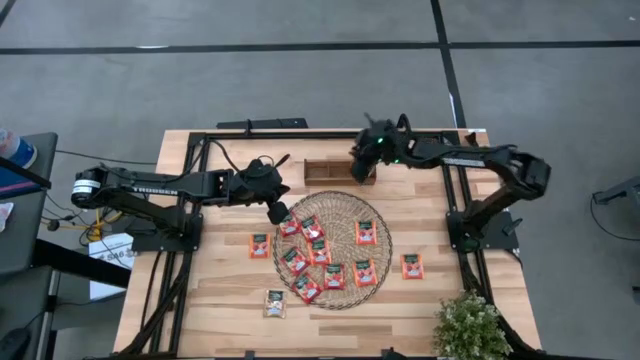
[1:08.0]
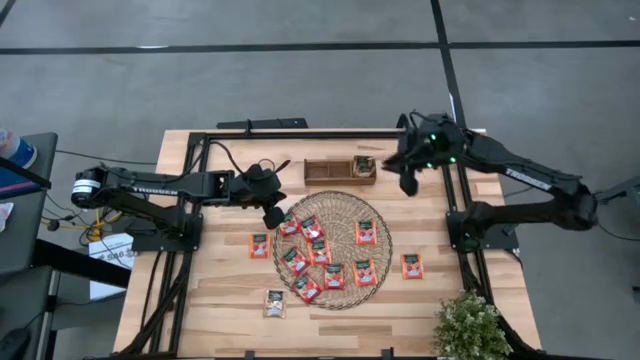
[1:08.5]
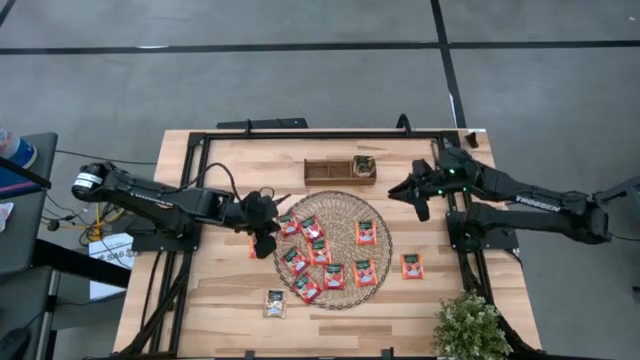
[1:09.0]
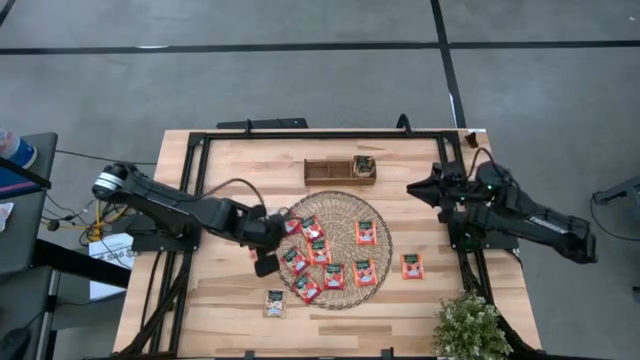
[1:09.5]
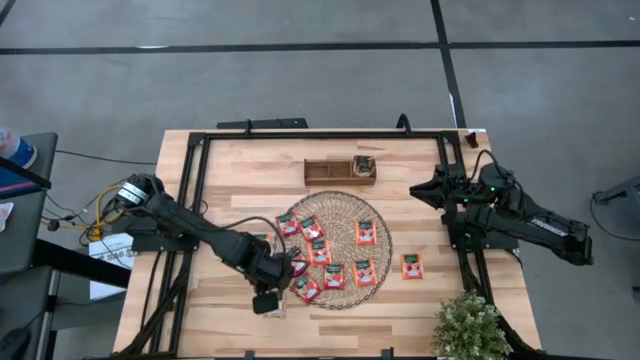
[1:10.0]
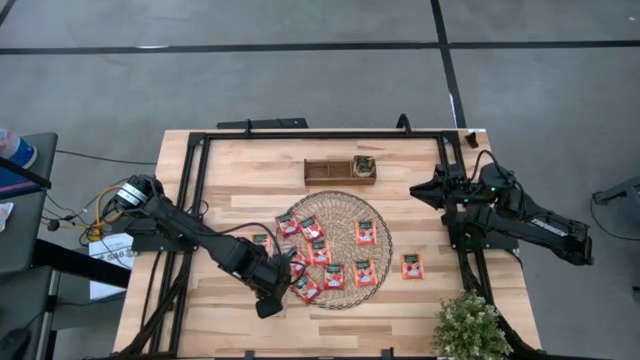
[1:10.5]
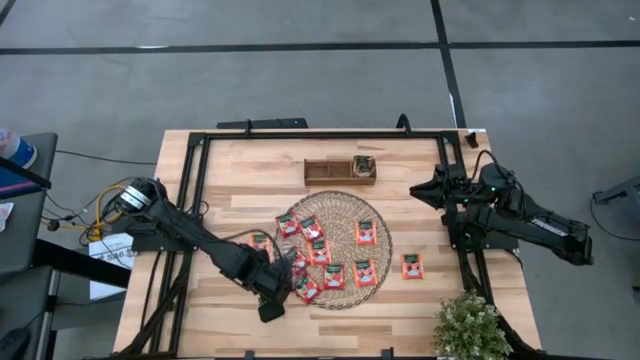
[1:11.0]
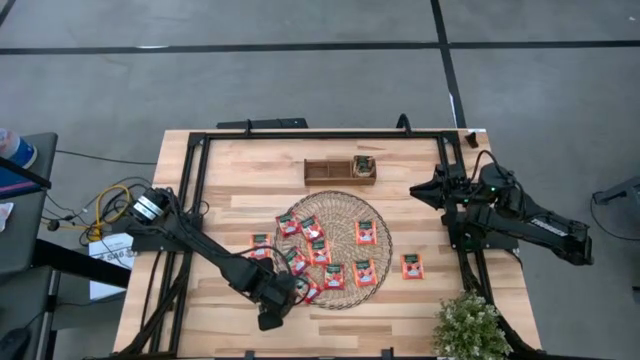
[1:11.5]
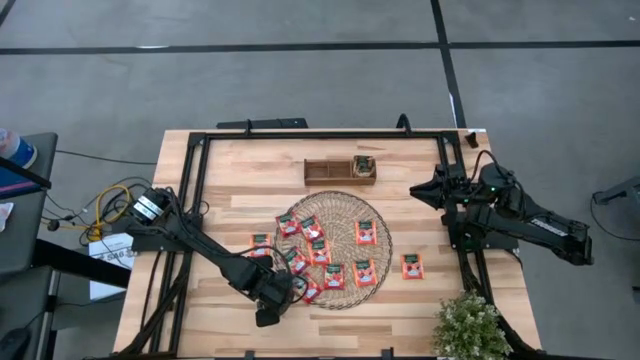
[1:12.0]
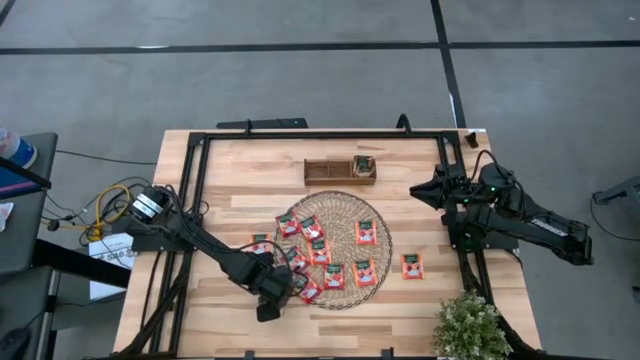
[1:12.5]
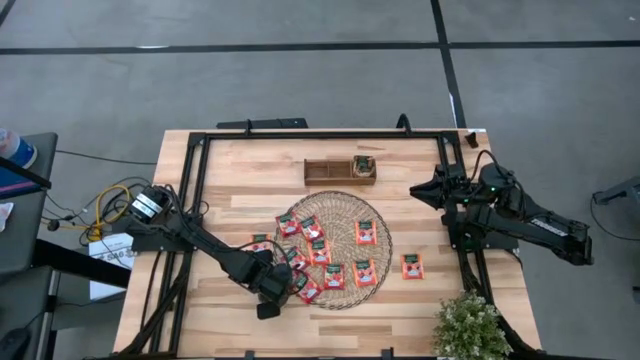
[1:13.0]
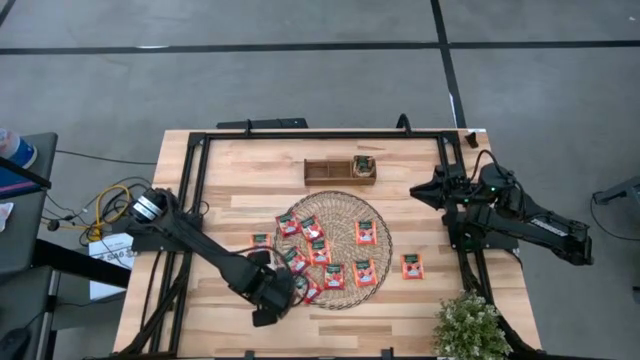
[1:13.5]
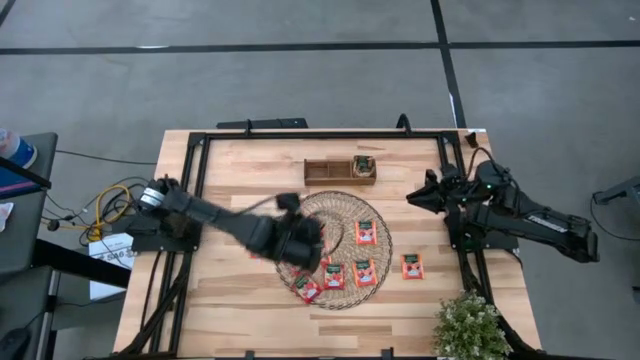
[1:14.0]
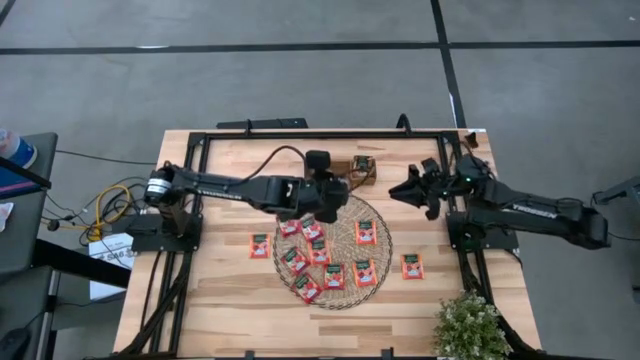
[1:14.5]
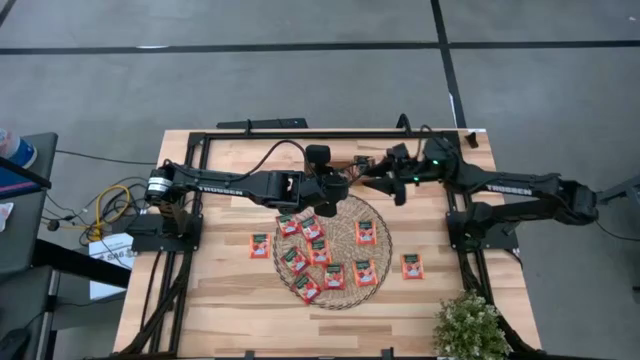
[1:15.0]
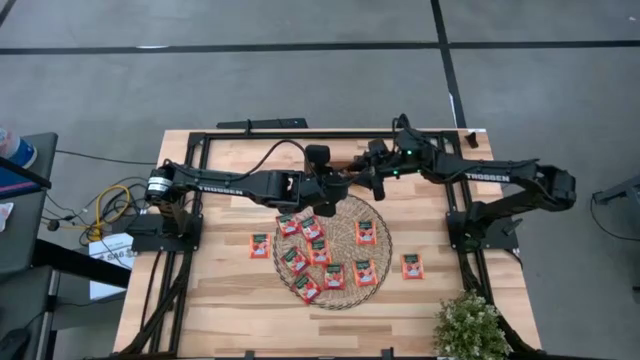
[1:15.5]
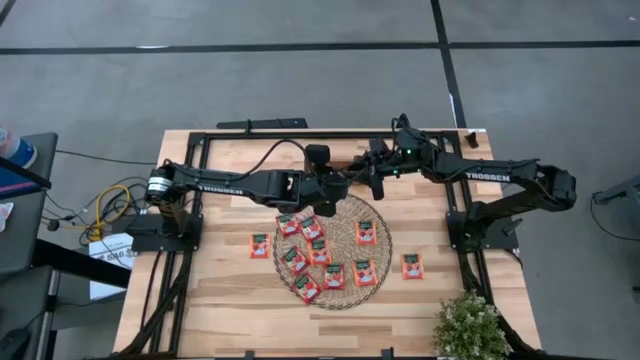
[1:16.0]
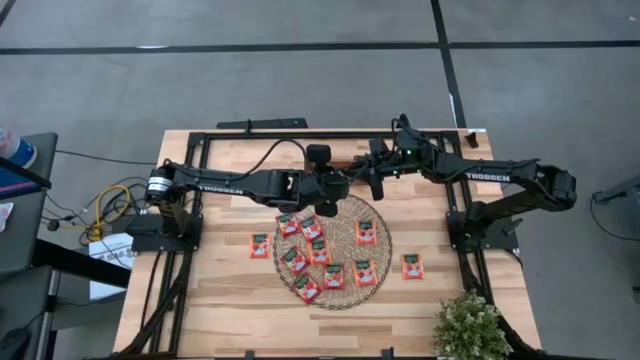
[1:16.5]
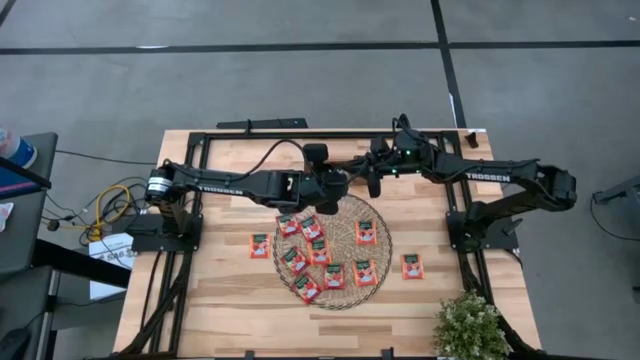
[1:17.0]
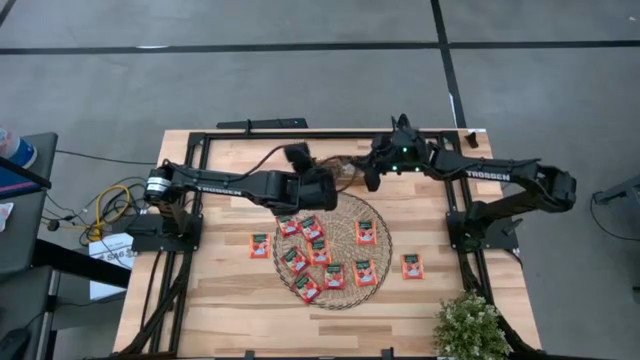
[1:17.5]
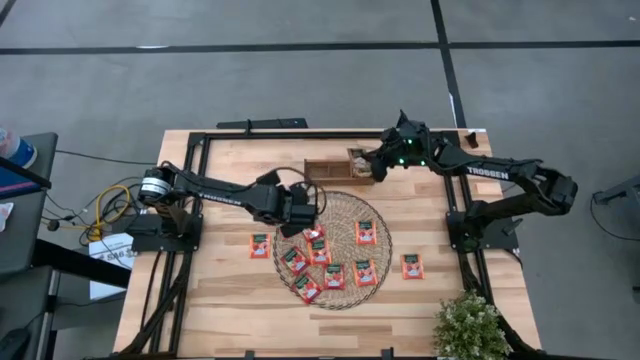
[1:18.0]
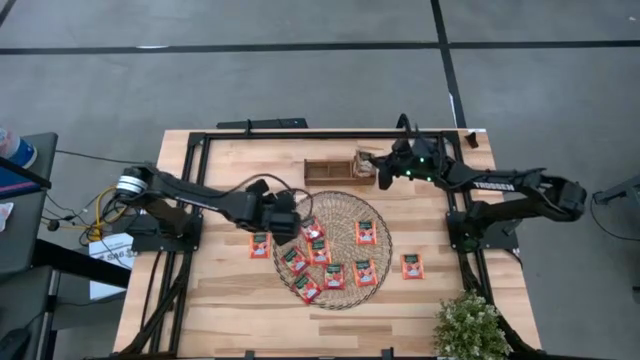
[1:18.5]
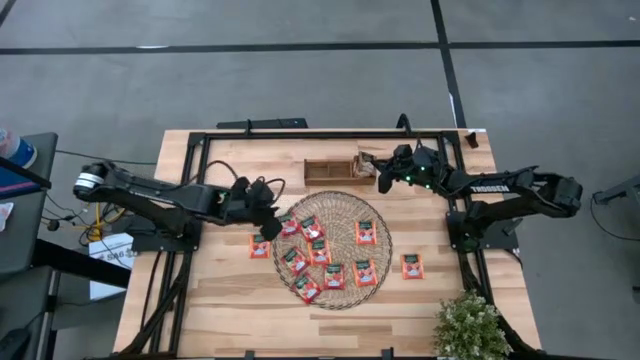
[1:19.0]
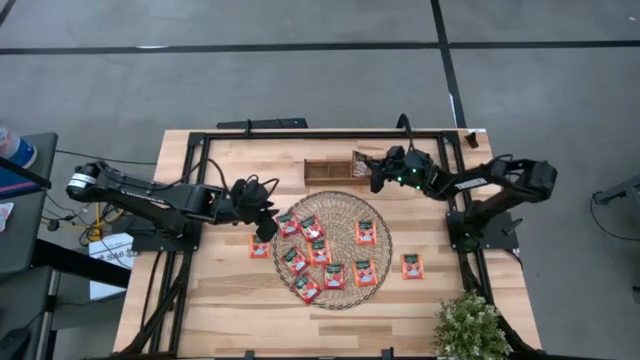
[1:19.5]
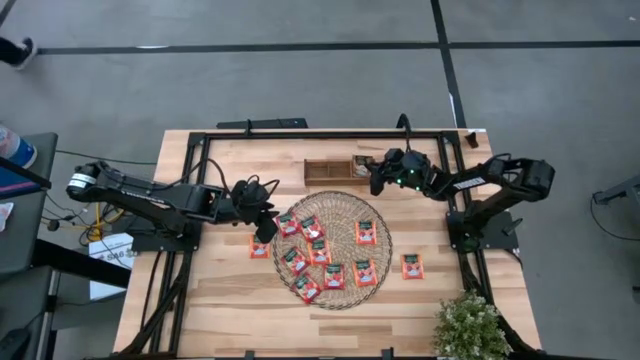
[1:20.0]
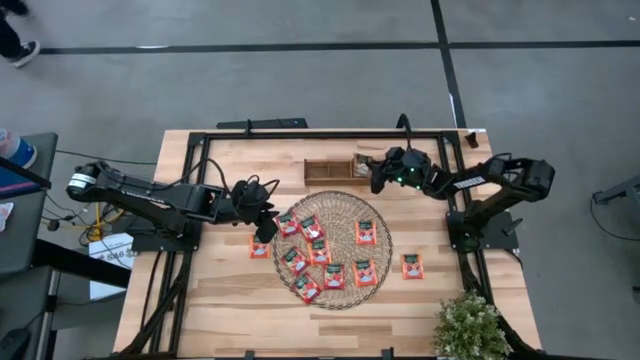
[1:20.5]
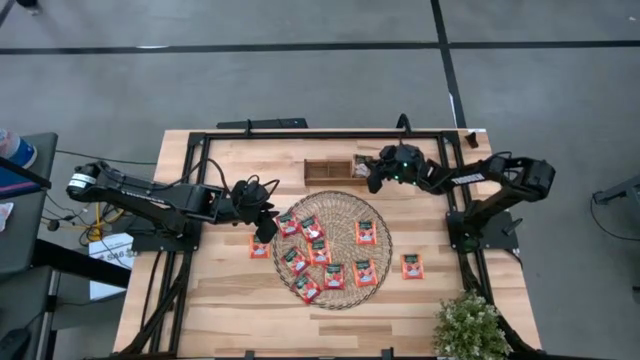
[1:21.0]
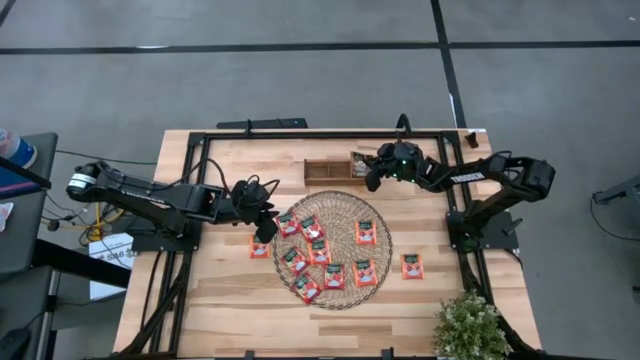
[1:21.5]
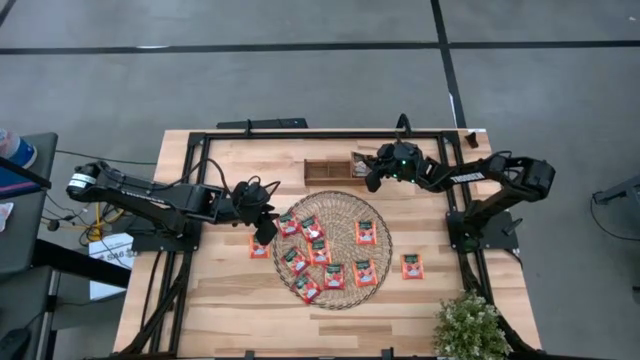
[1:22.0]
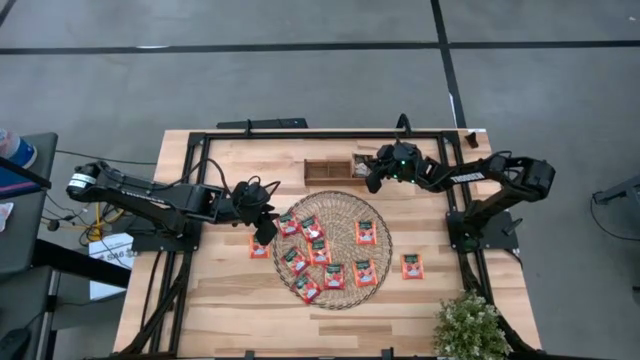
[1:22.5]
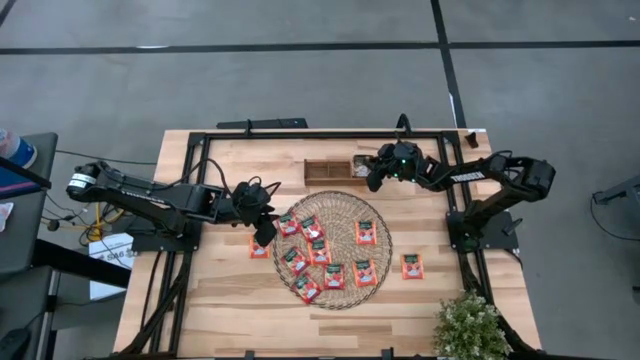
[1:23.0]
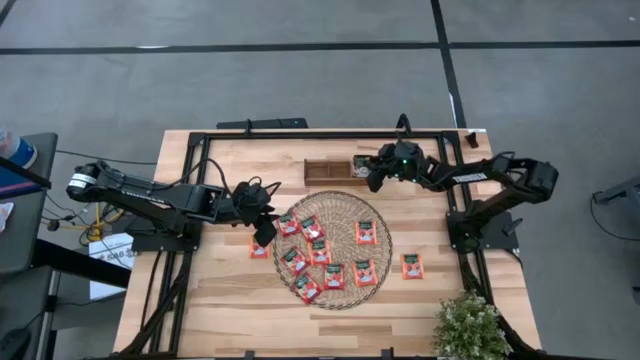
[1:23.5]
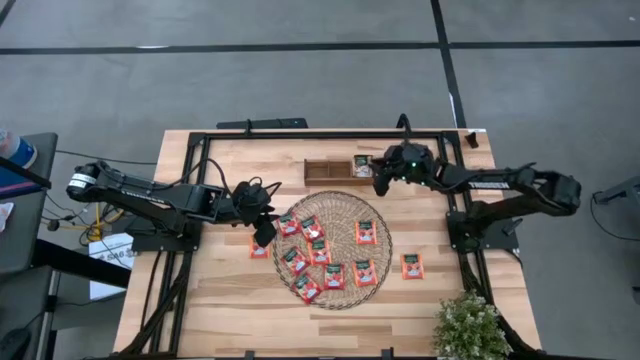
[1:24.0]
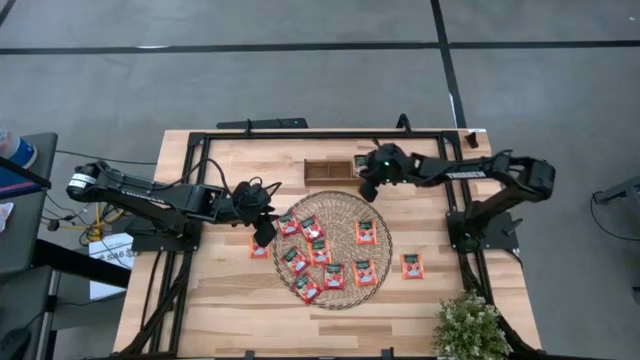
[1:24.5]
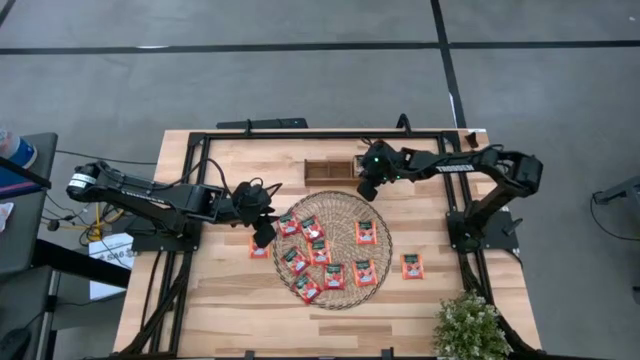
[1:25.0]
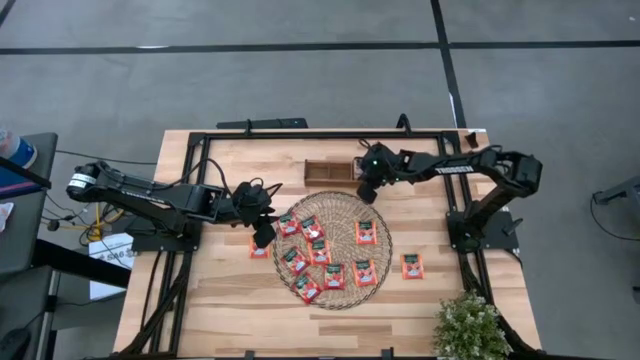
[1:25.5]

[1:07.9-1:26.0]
Task: Pick & Place Tea
Put the brown tea bag into the right slot of the wooden organizer

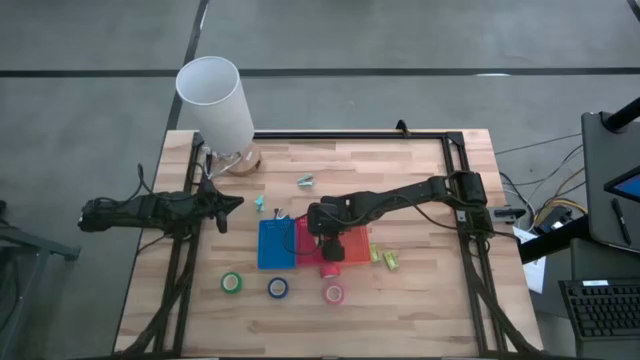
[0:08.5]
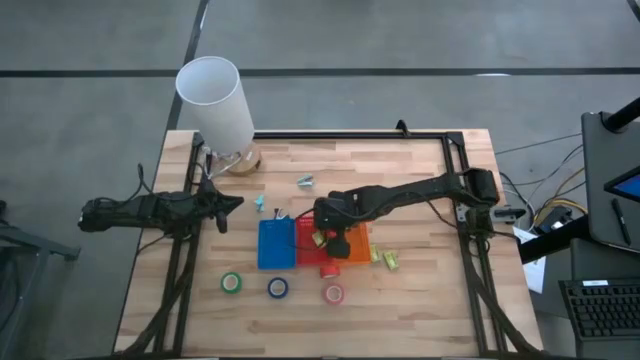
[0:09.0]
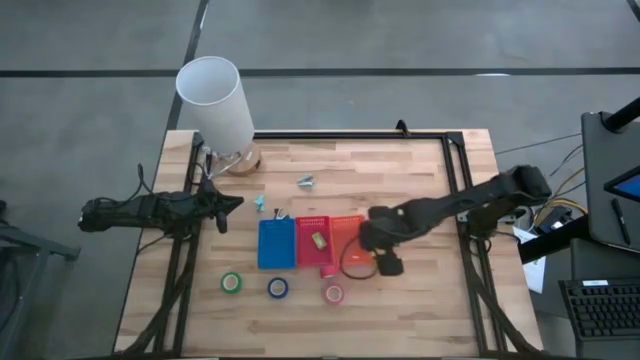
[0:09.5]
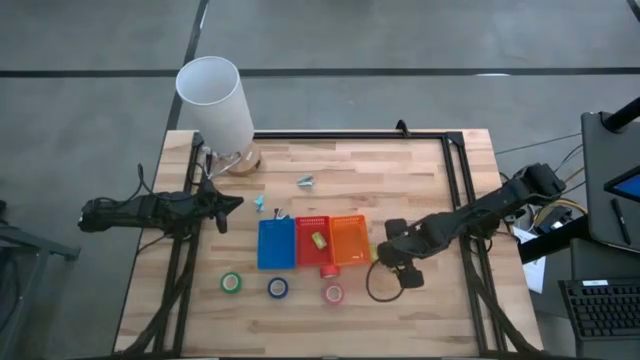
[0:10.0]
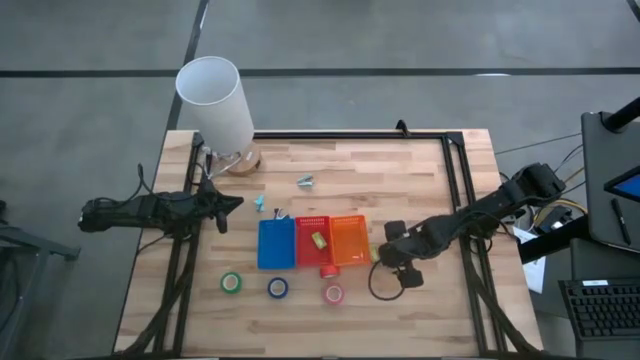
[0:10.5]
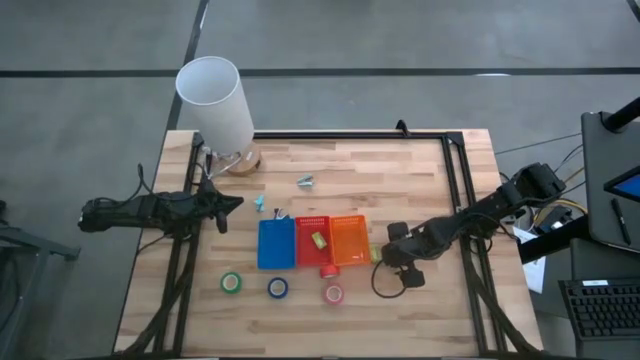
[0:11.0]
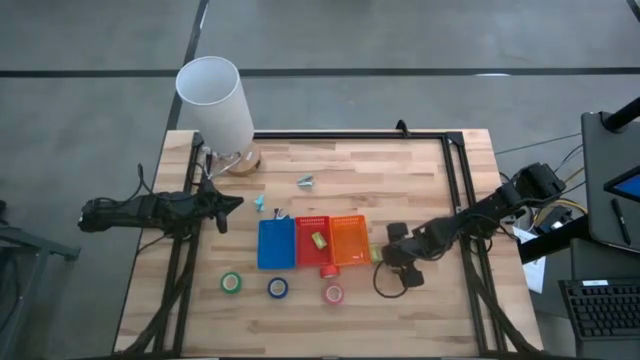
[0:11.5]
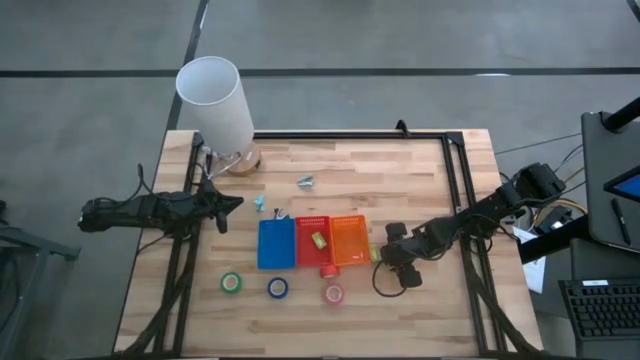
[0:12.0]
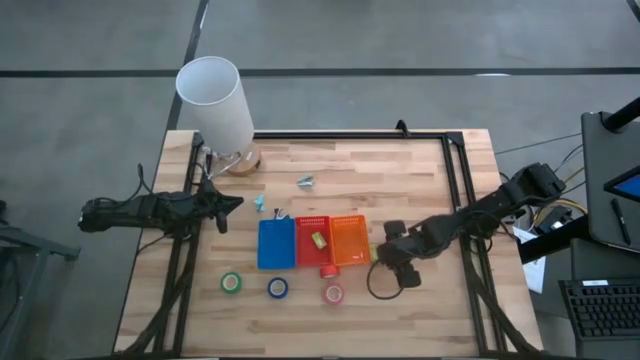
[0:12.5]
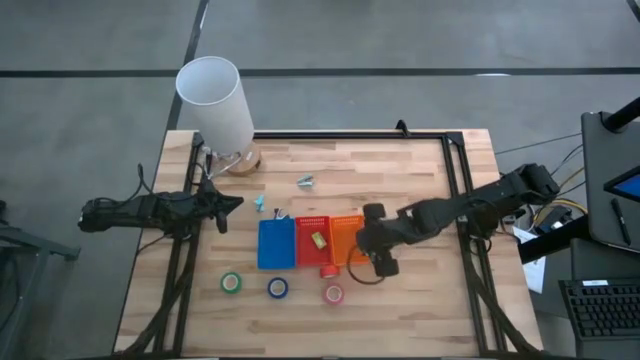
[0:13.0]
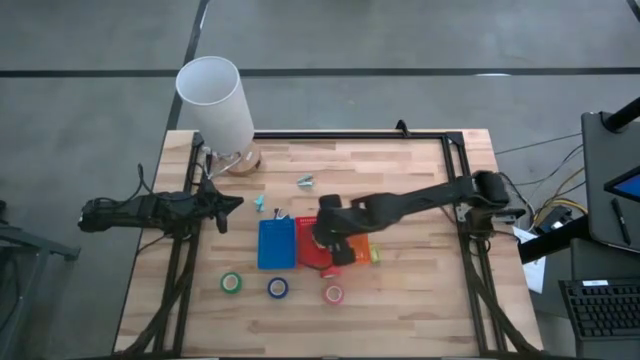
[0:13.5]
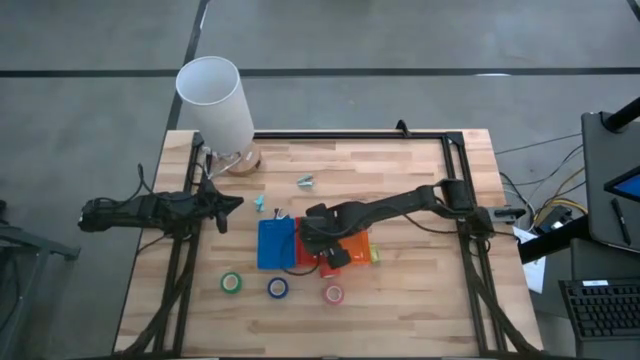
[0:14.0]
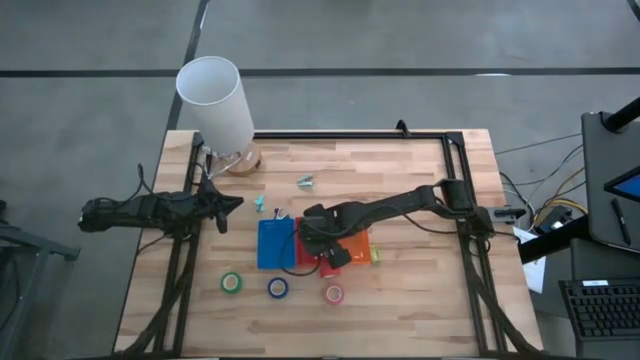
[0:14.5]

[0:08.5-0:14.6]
Task: Pick and place Stapler, Stapler remover, tape
Put the right green staple box into the red bin
